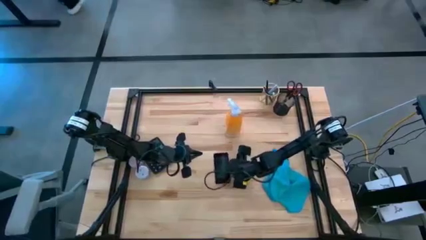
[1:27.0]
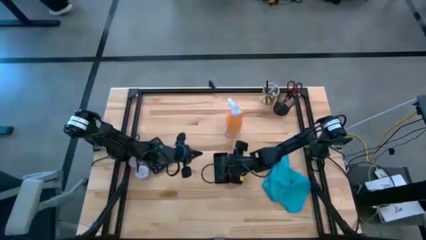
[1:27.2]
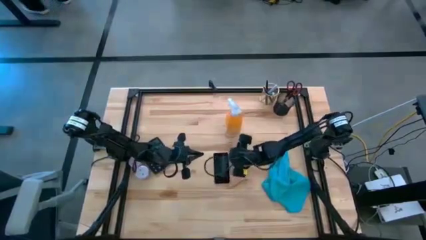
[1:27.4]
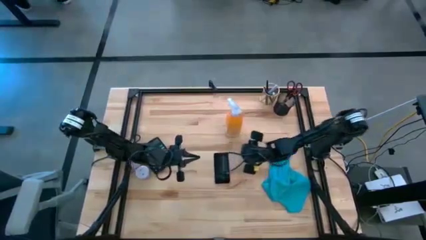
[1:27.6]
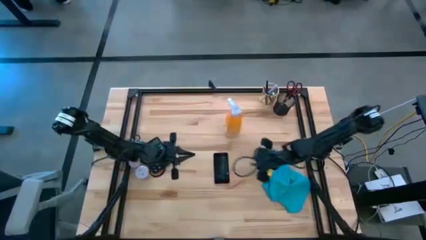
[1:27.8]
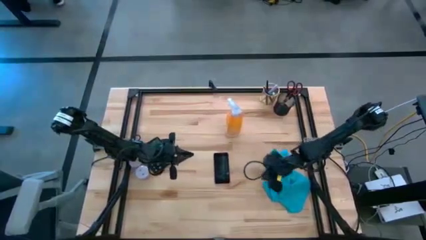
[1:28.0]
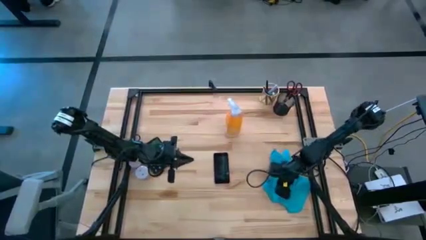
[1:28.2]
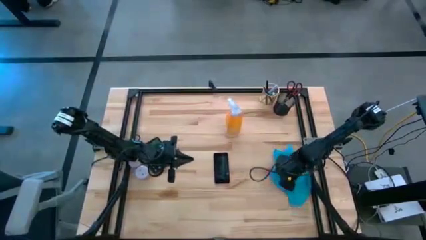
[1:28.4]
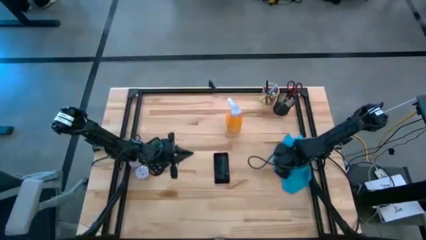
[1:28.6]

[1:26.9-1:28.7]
Task: Apply microfiber cloth
Adjust the blue microfiber cloth

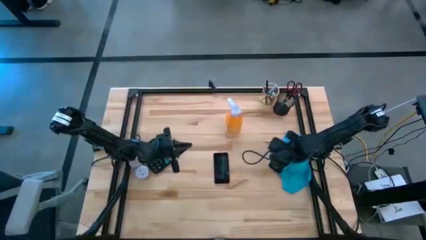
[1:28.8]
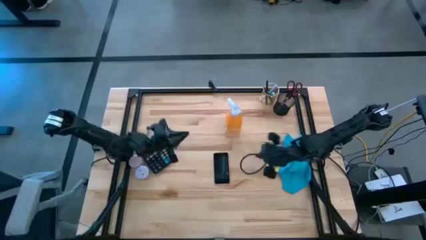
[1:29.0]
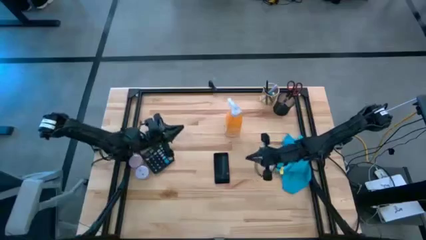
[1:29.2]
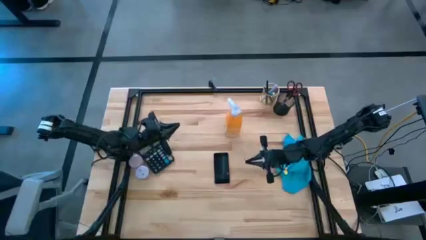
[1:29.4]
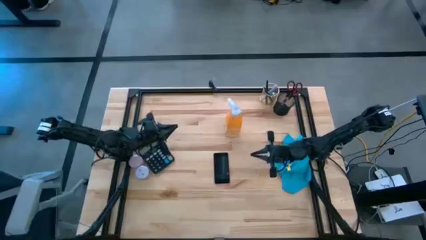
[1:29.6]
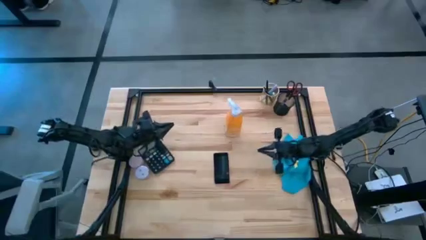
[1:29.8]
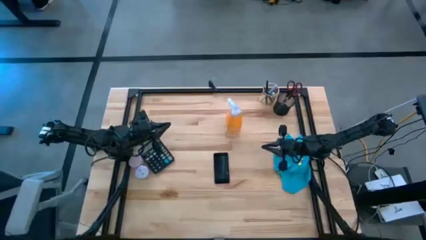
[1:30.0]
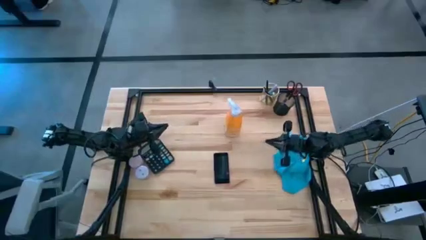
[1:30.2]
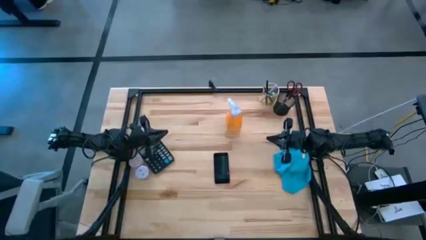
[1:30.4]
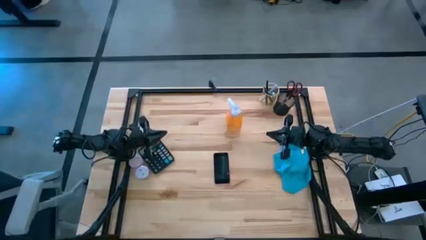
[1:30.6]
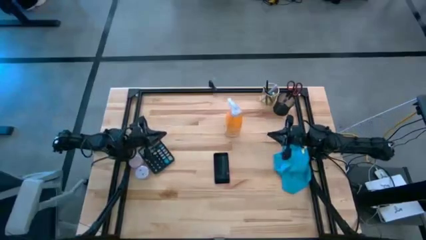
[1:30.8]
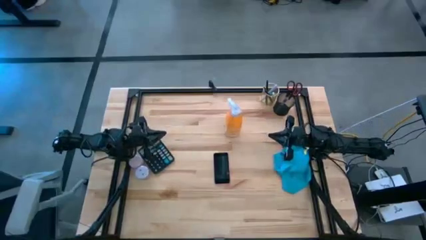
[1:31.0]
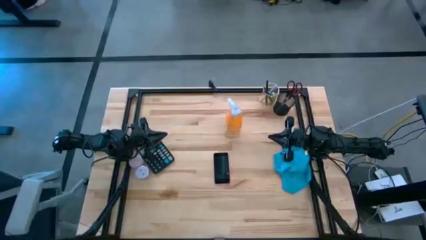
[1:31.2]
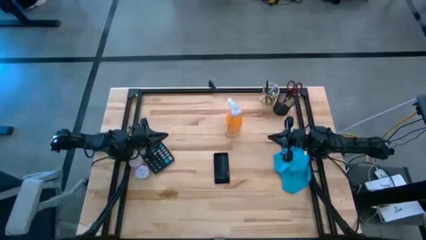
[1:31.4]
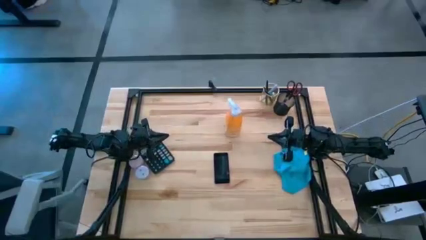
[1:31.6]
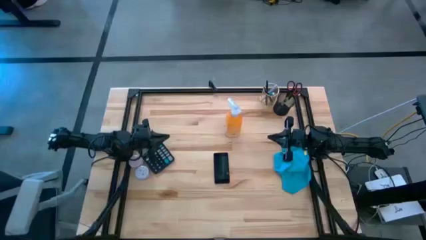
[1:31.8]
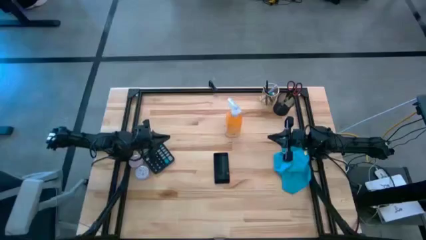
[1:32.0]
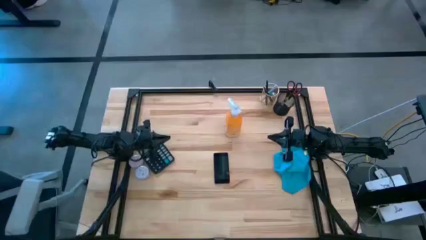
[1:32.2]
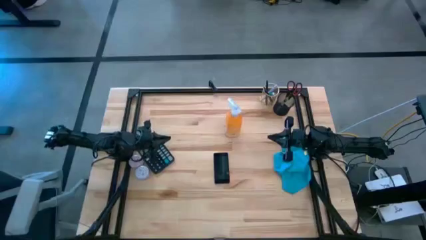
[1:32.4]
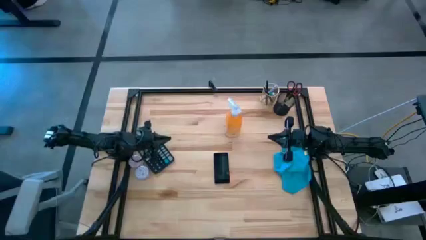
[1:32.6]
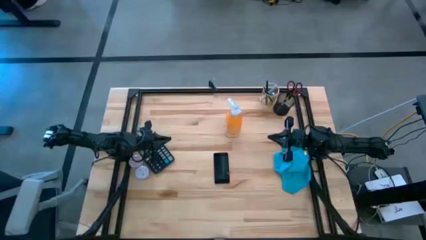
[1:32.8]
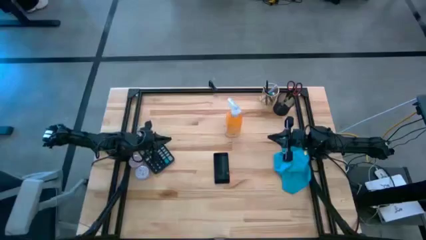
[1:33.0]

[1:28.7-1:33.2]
Return to Home Position

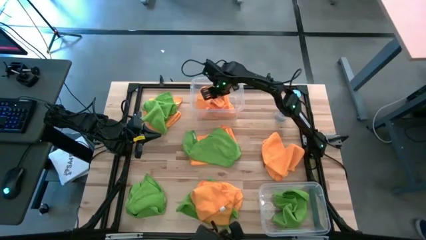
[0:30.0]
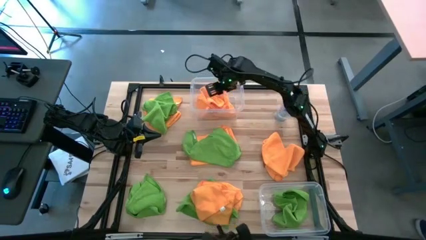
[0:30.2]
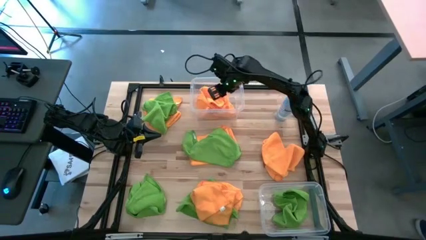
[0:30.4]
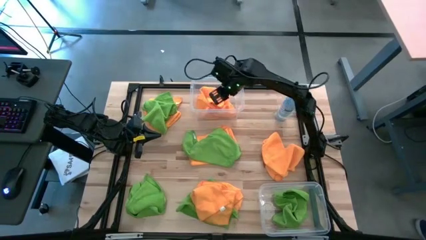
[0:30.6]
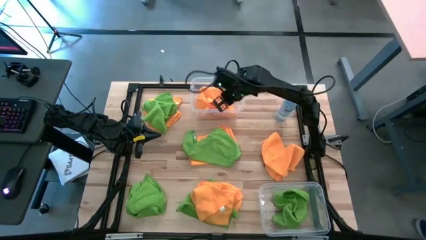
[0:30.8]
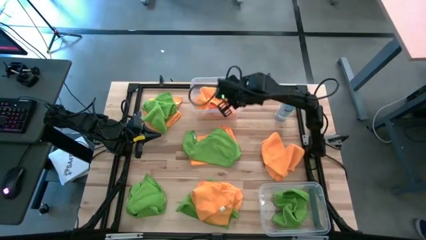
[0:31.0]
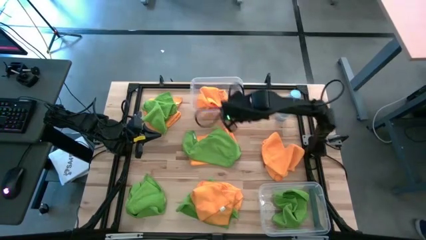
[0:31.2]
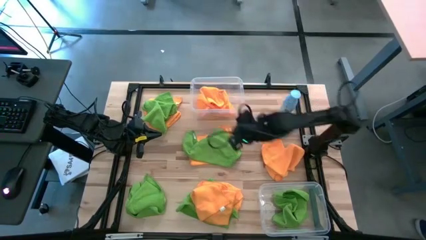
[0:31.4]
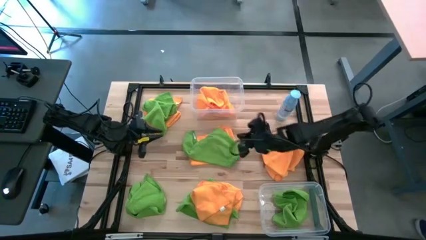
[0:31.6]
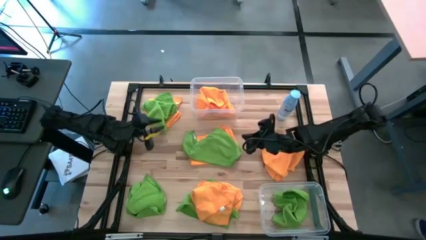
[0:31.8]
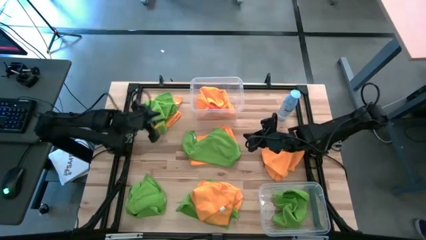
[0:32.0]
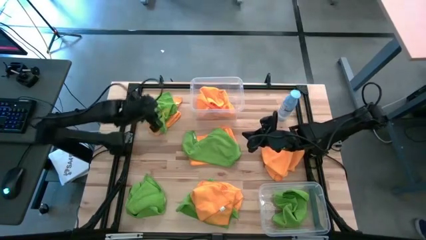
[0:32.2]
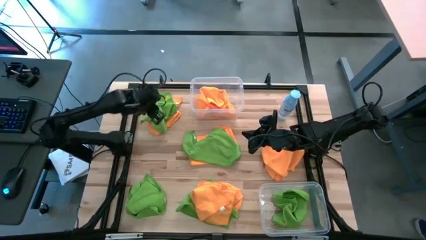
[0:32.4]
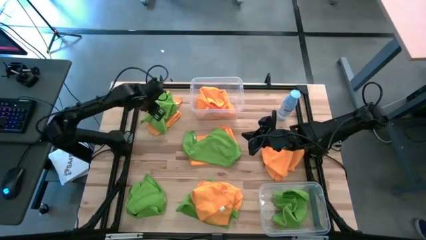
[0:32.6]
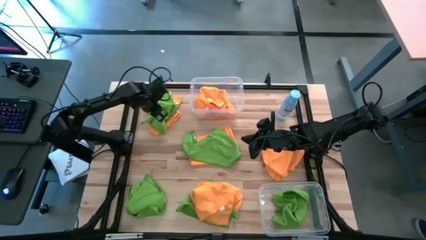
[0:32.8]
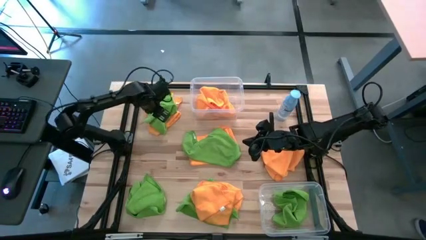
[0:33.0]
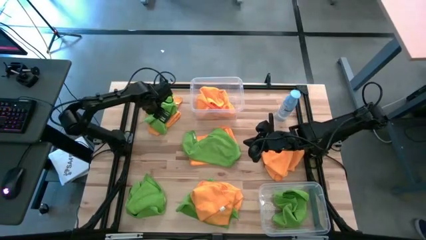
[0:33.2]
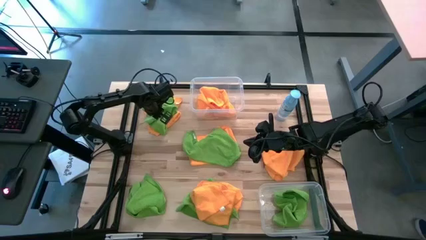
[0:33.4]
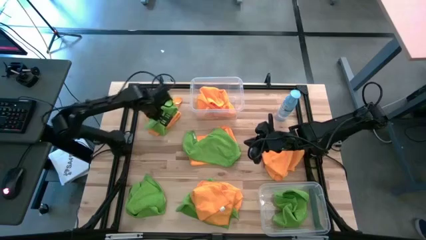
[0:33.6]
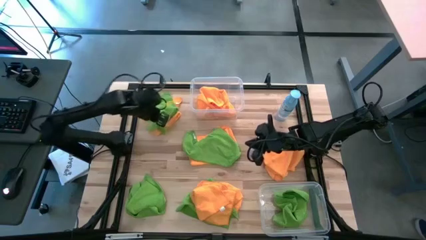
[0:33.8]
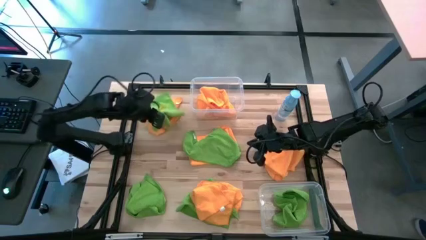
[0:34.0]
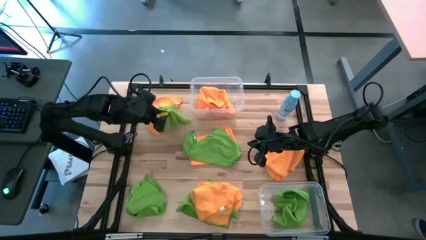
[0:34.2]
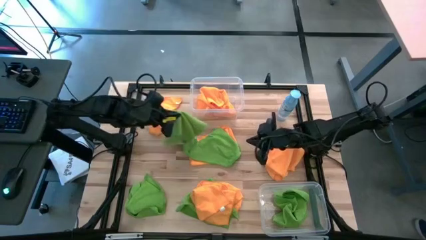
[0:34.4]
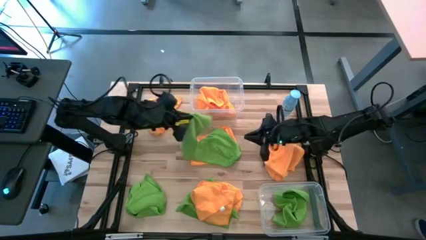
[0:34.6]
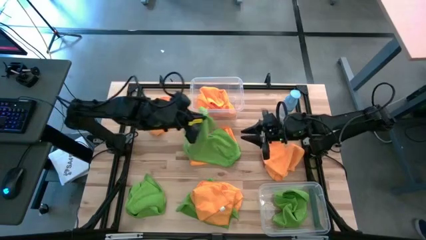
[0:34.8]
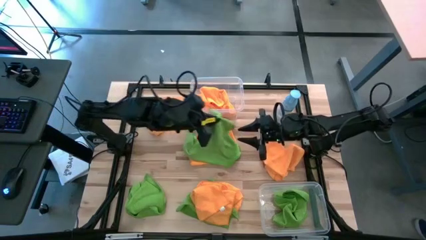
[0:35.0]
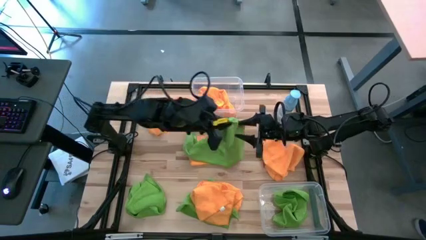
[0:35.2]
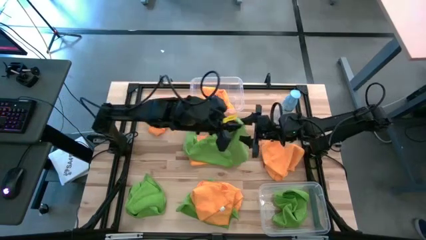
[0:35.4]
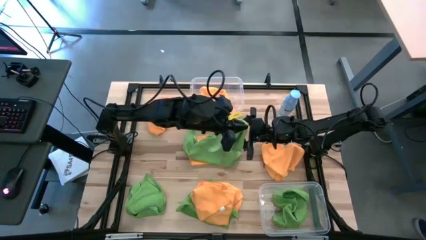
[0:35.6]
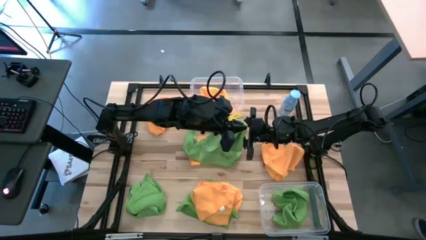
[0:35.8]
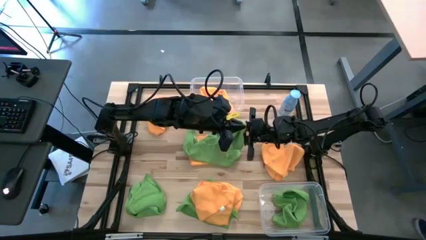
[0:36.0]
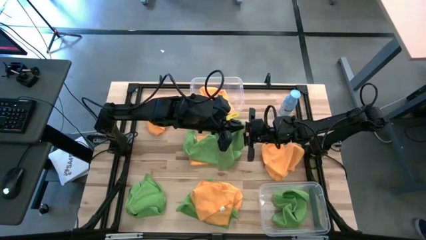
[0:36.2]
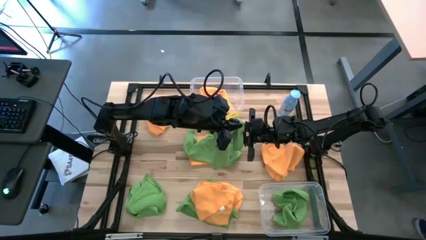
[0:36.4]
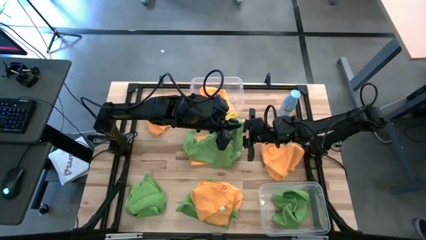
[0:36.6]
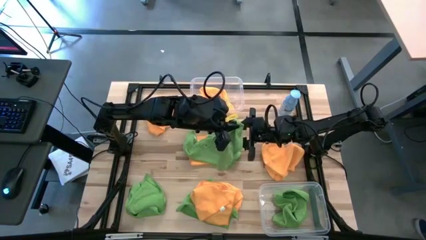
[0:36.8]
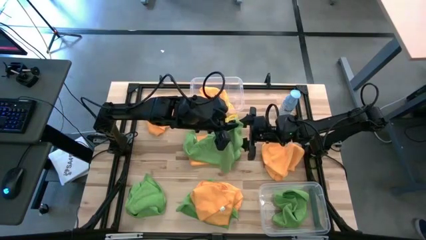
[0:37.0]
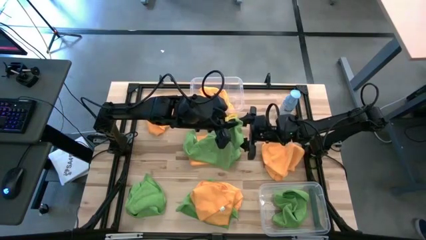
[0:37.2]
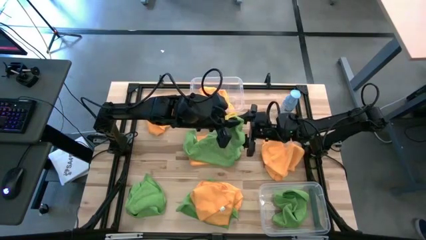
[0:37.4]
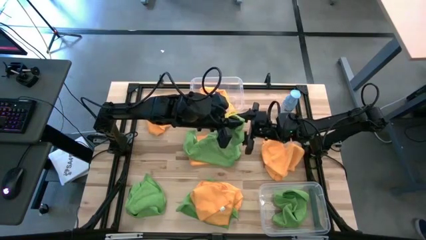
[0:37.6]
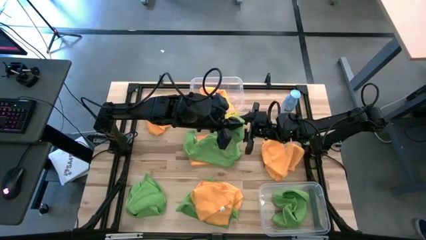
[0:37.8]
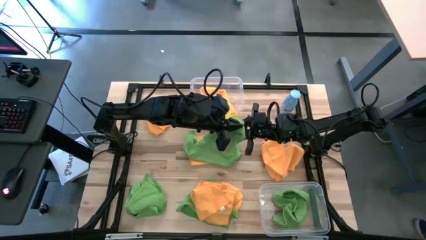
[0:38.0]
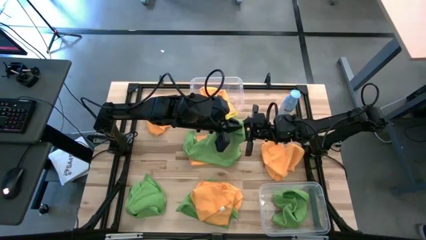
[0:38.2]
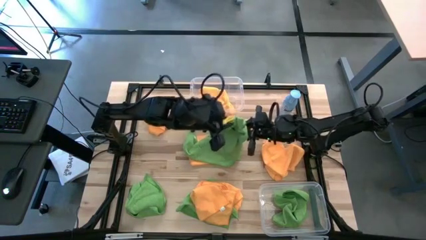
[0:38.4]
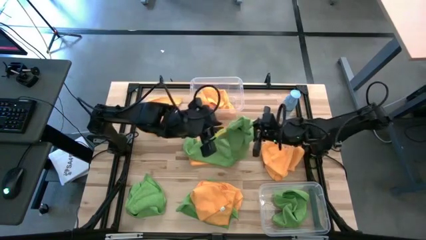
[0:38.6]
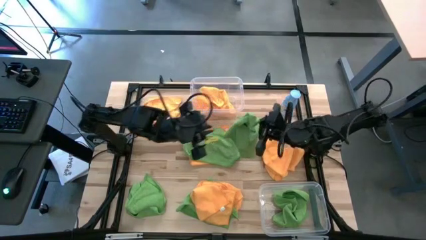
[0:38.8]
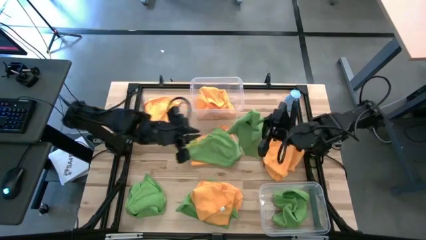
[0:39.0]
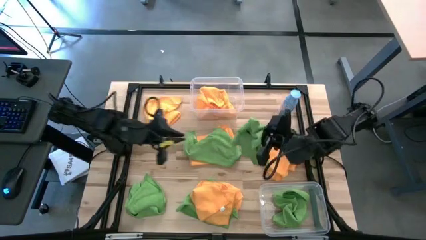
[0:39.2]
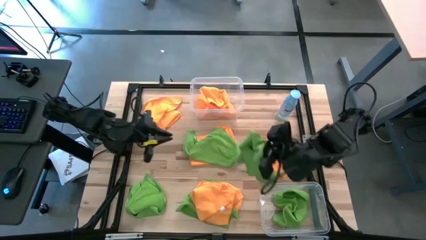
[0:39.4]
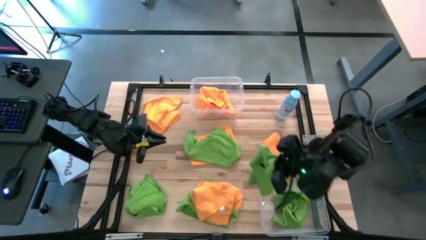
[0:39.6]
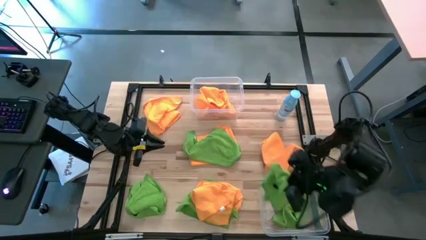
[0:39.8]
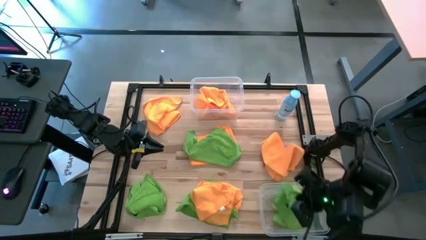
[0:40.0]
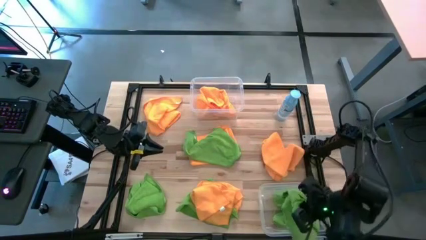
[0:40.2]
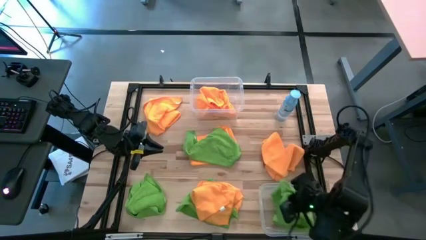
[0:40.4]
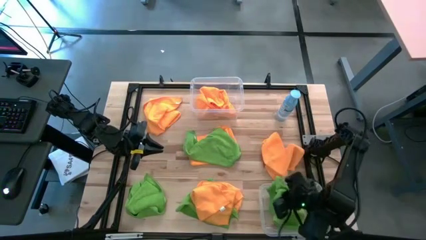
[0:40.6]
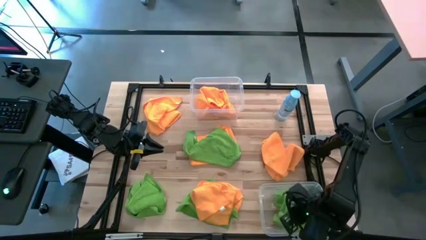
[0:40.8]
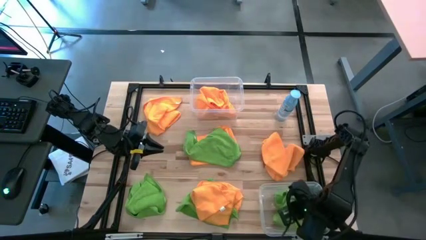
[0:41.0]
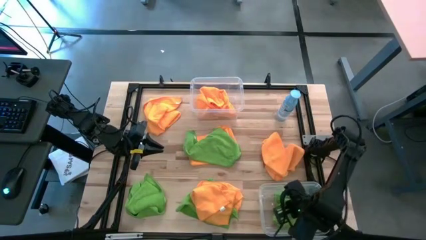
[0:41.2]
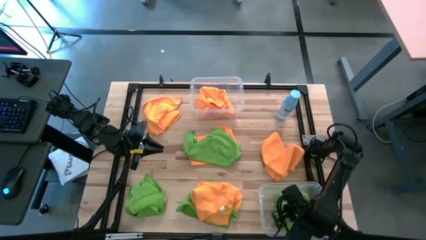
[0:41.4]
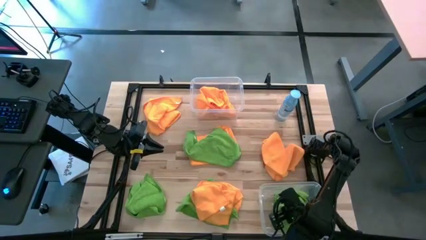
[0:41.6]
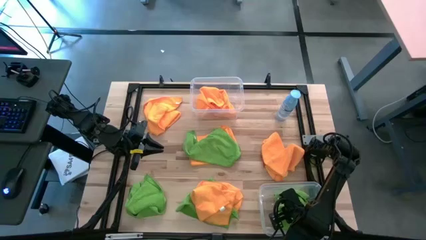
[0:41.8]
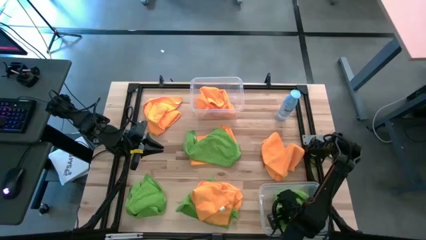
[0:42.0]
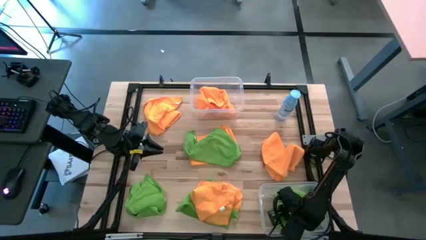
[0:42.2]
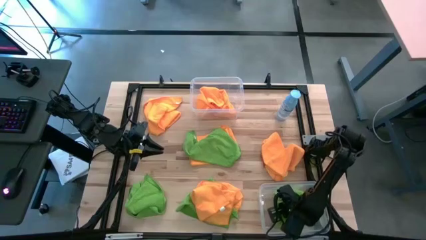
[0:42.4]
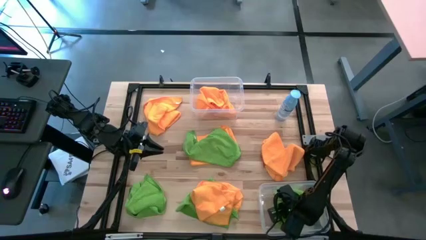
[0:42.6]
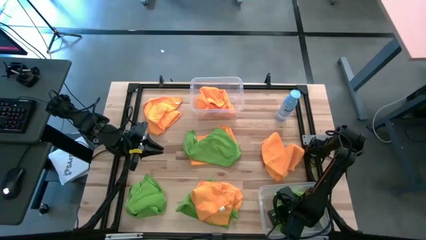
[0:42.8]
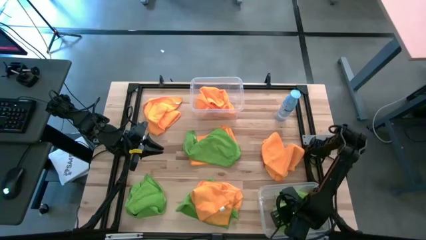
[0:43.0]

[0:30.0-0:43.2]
Task: Sort microfiber towel by color & place in baskets
Put the green microfiber towel into the bottom transparent bin
